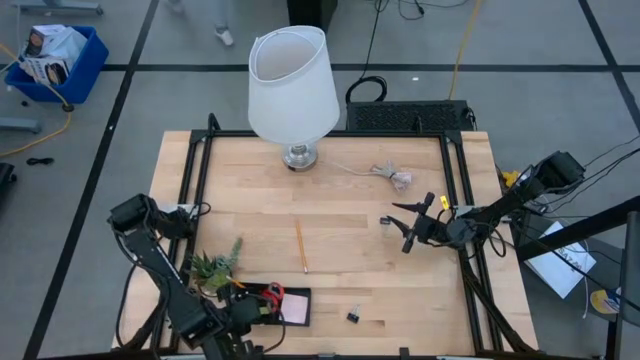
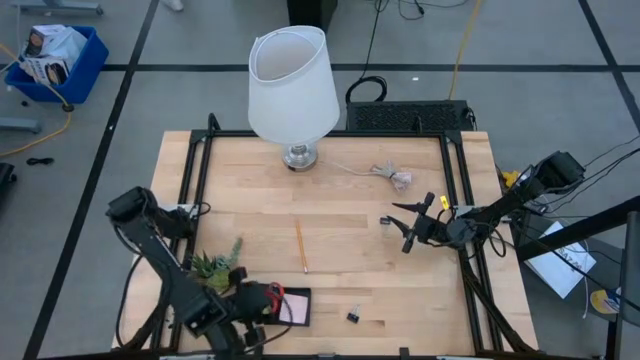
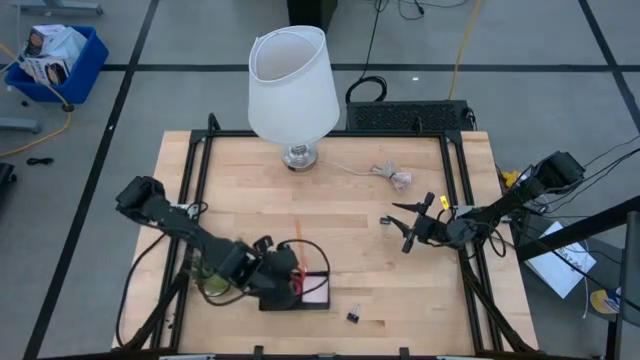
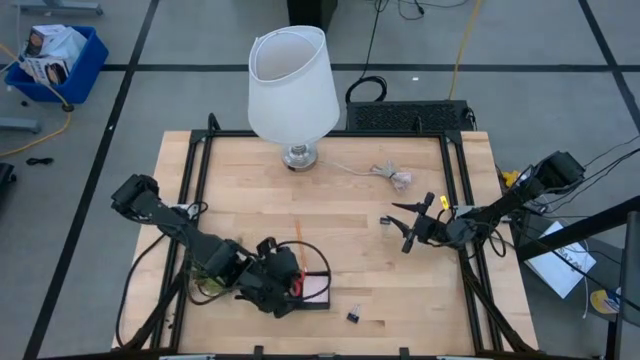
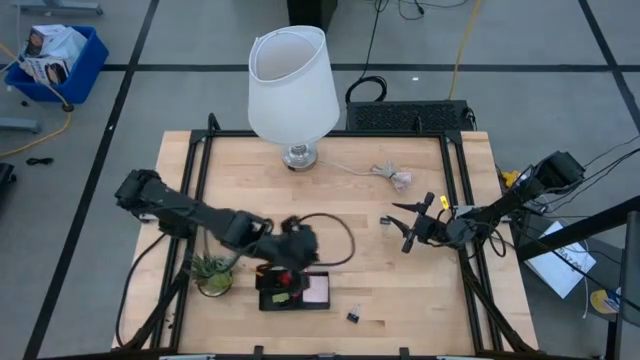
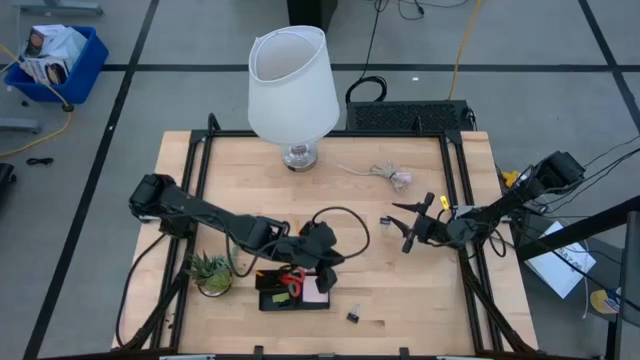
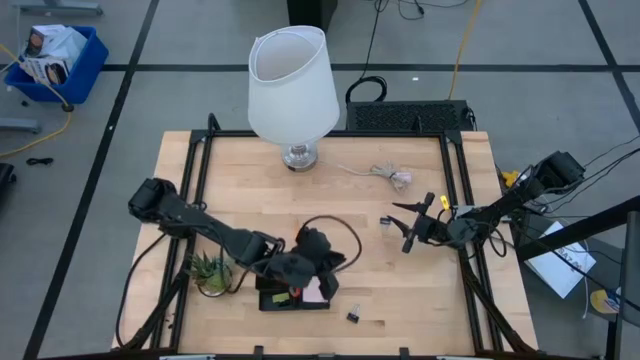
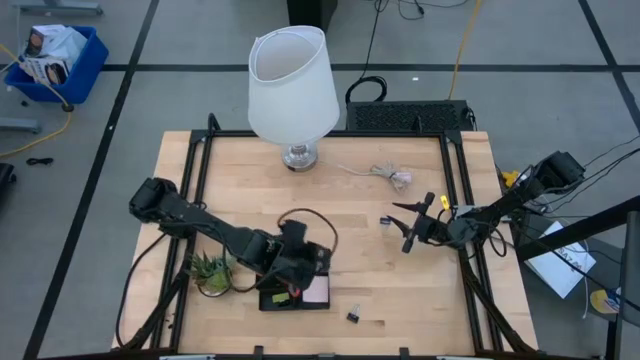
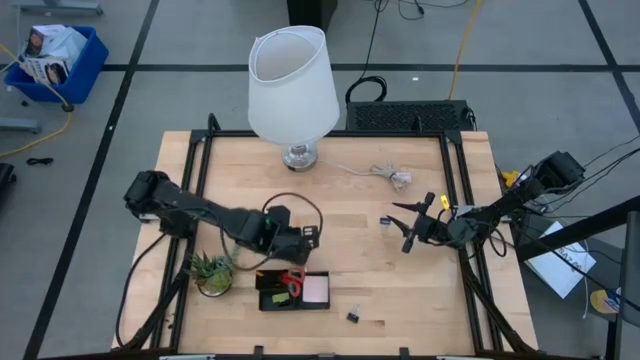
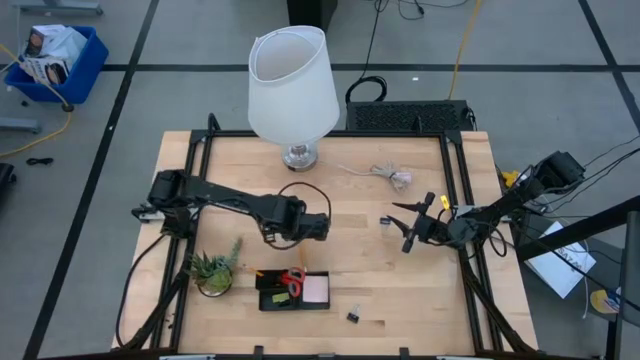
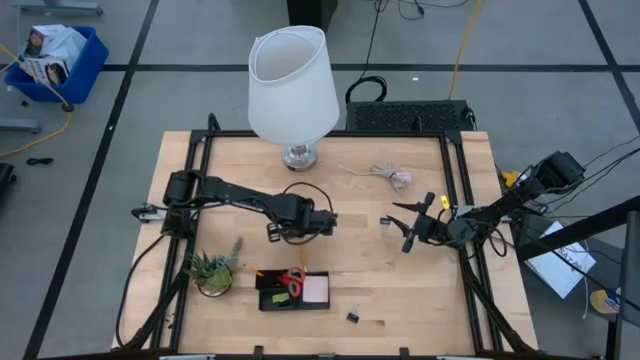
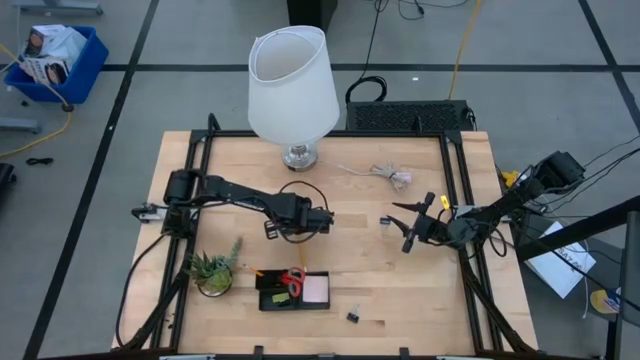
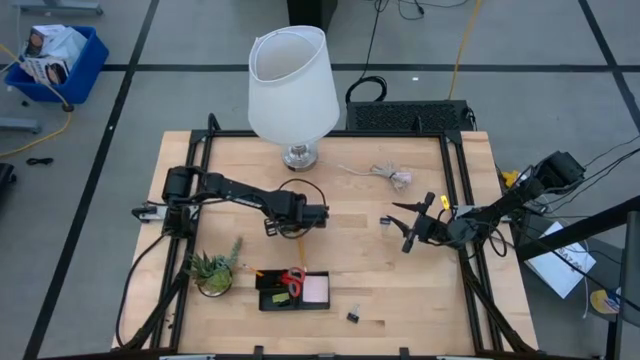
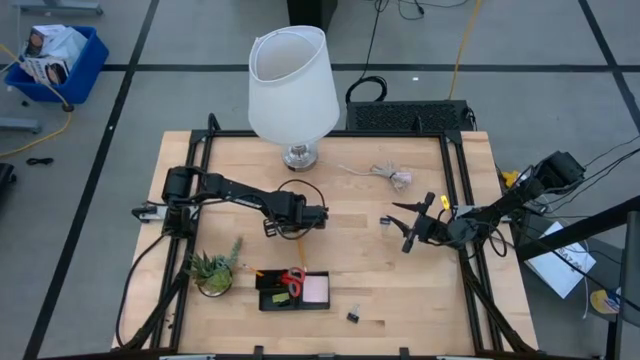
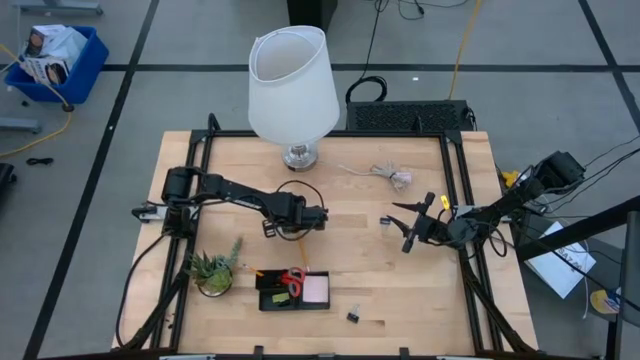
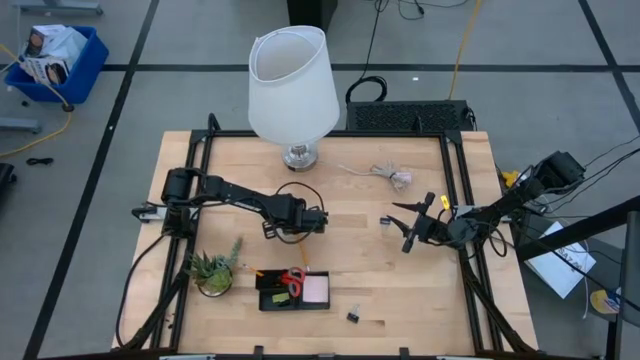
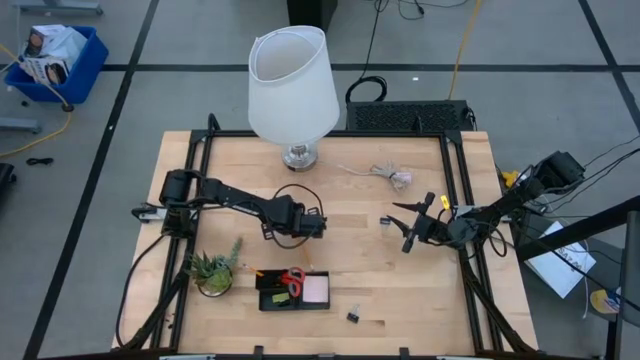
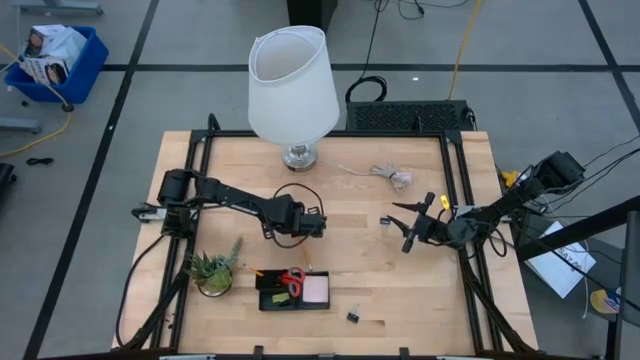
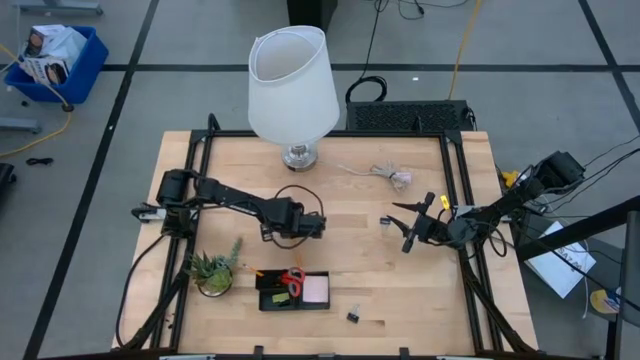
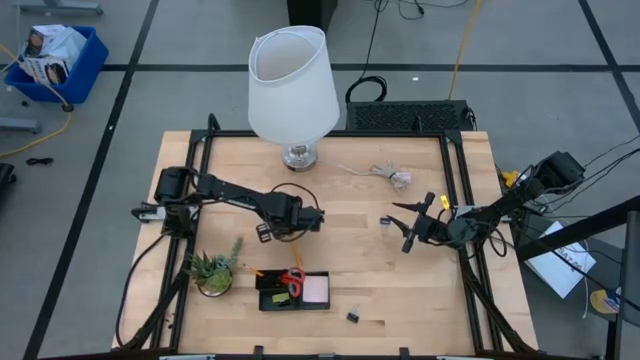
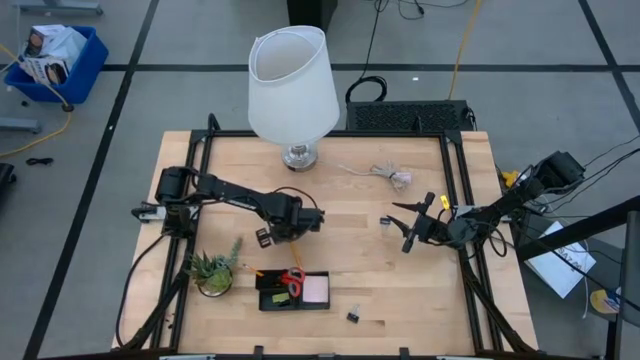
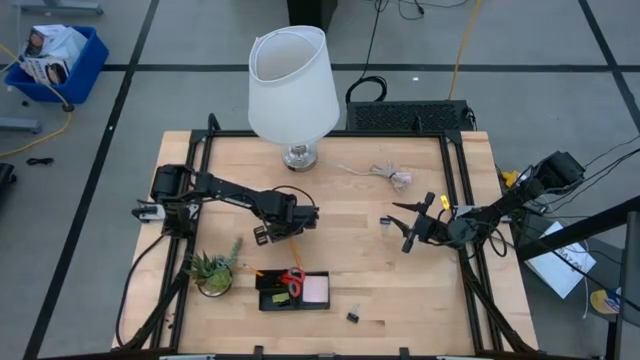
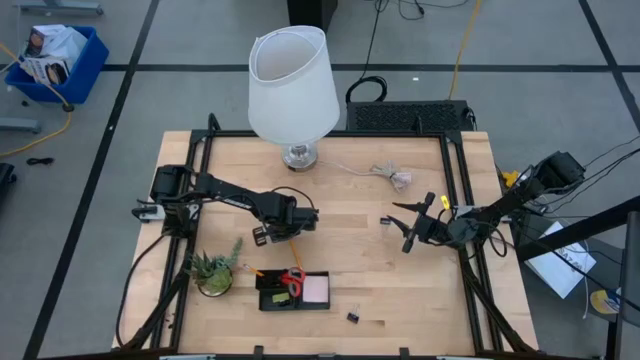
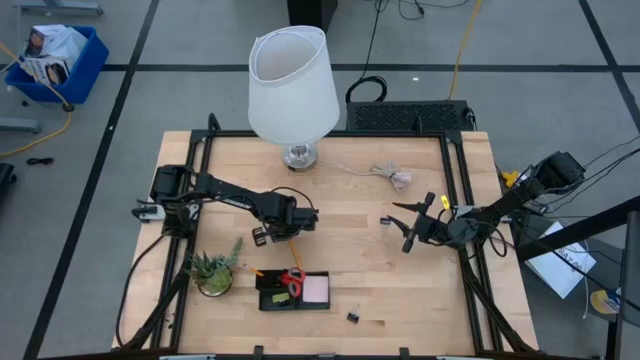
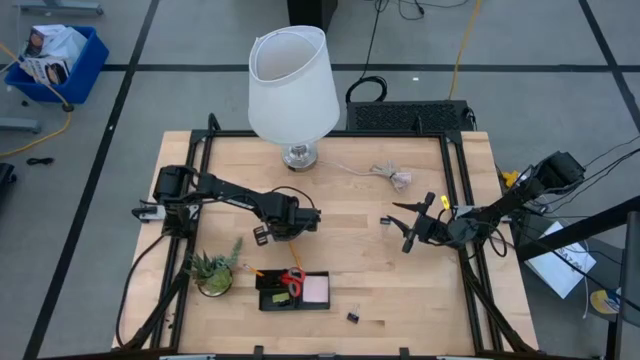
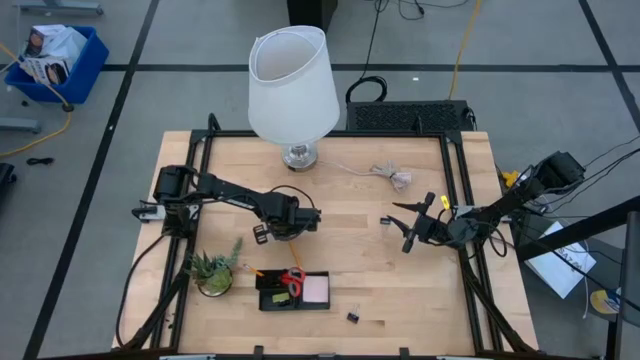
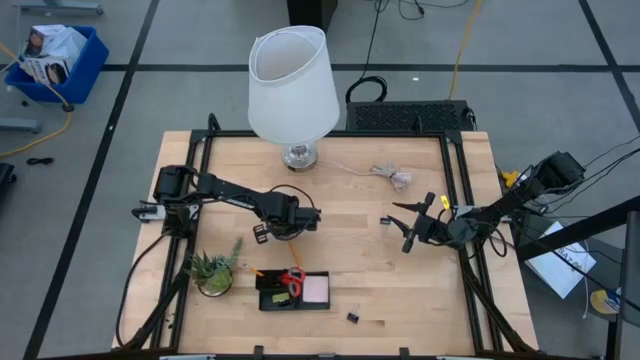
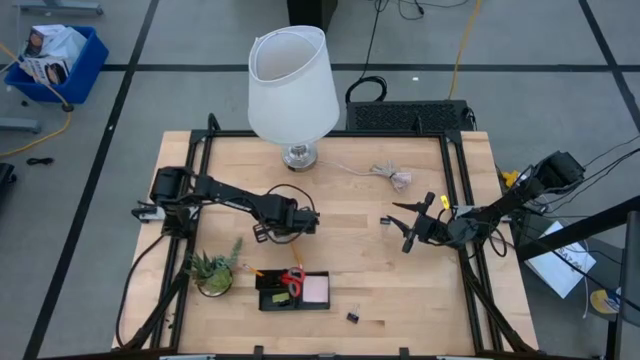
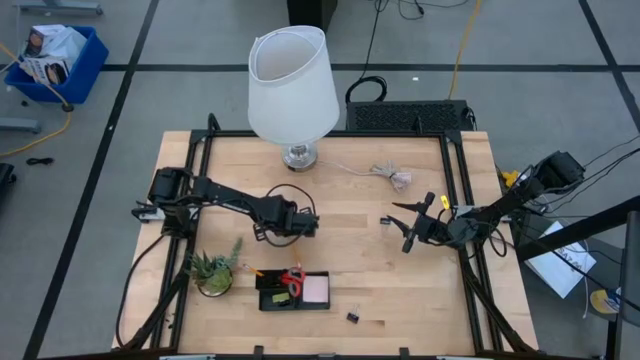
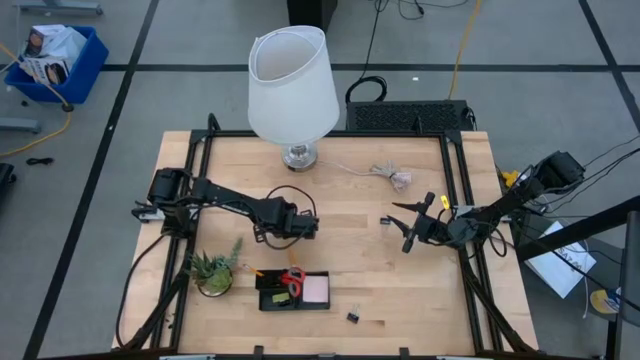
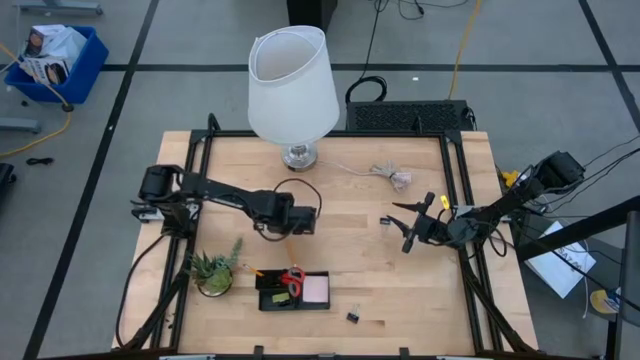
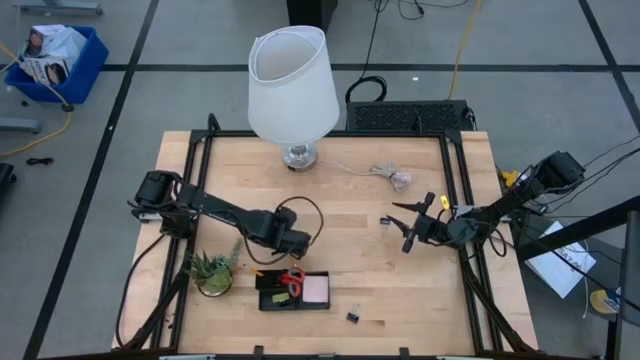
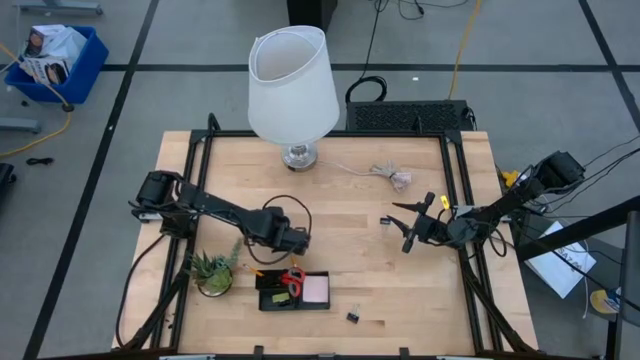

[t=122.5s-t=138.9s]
Task: Pick and place office supplies into organizer
Put the yellow pencil into the black desk organizer

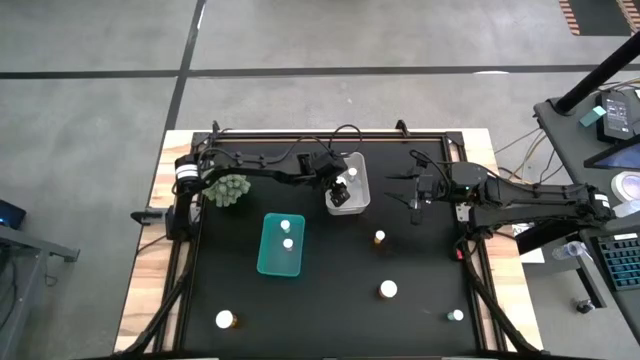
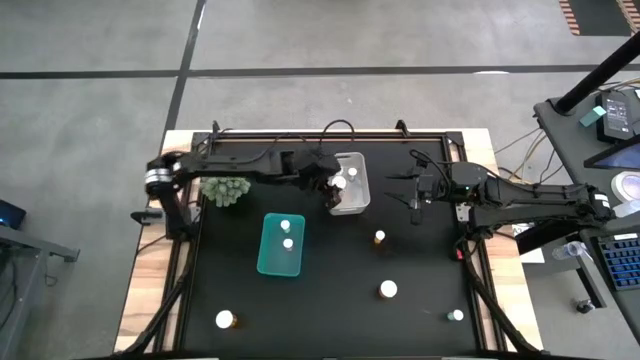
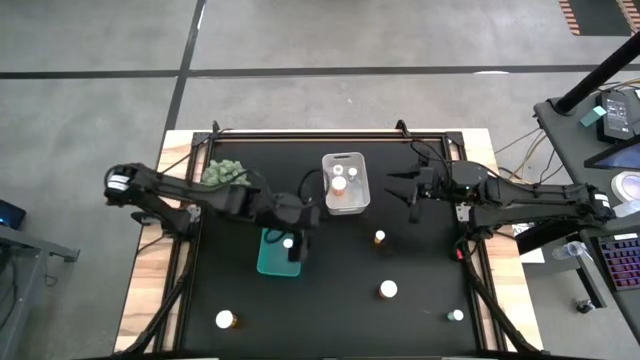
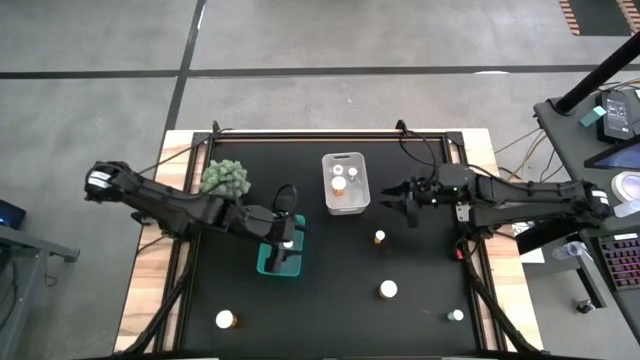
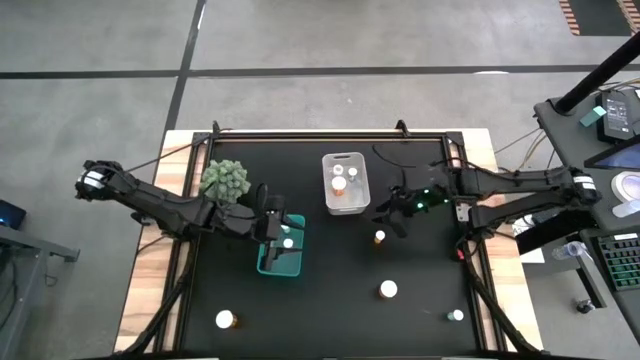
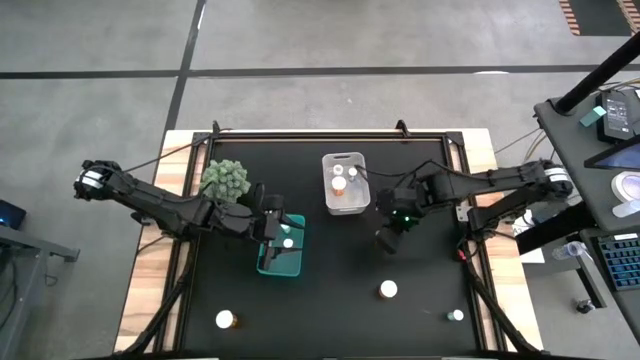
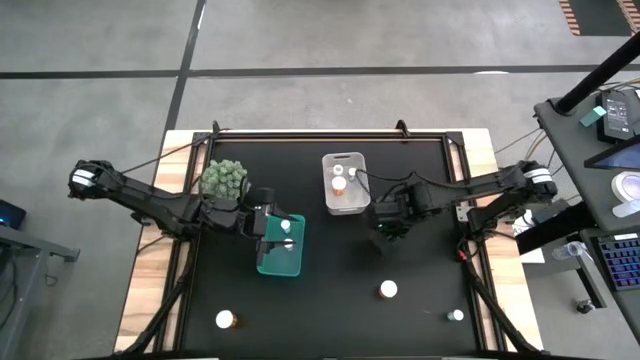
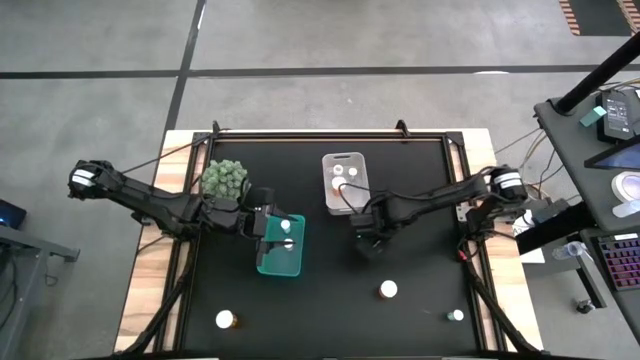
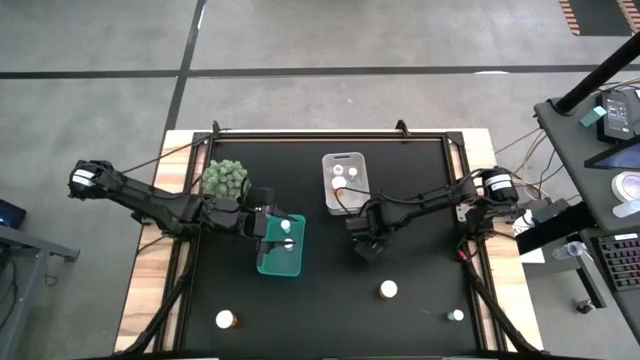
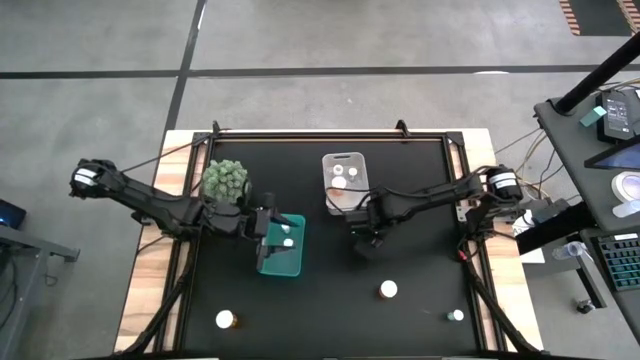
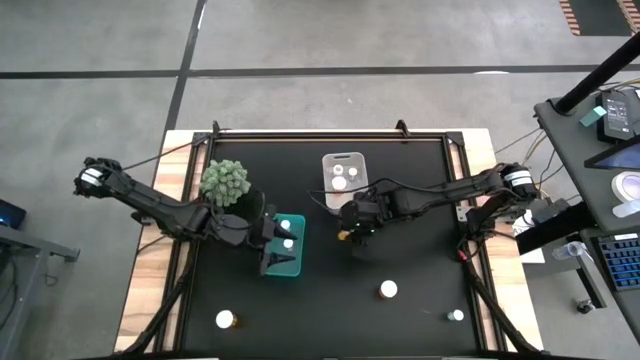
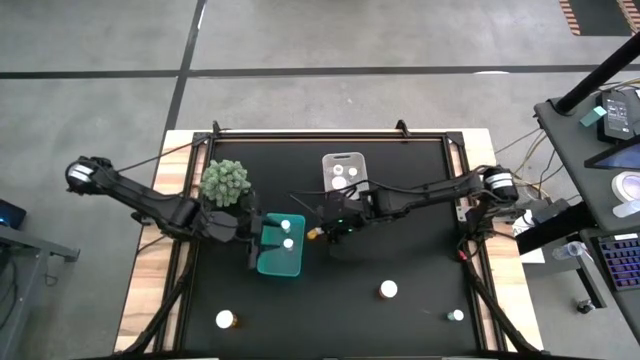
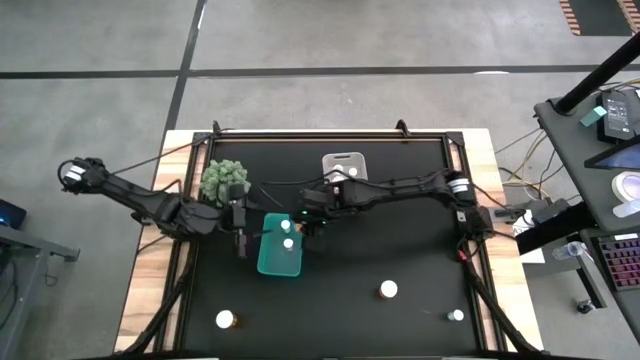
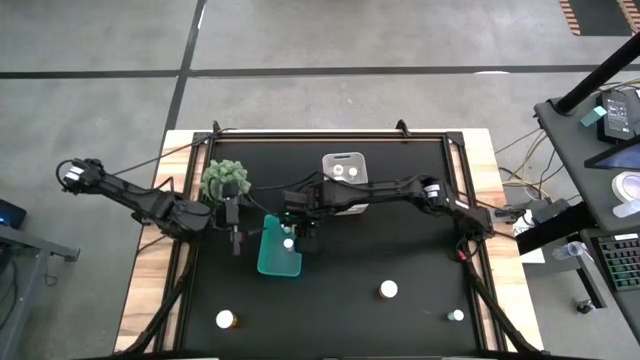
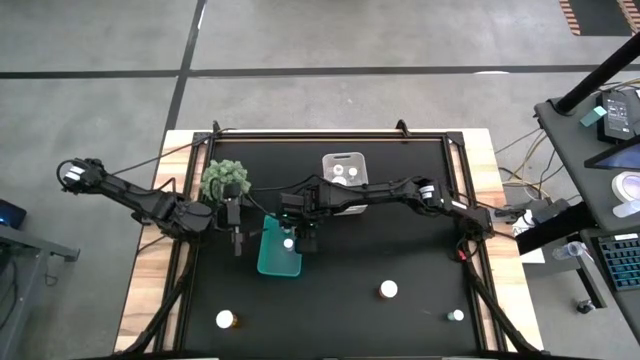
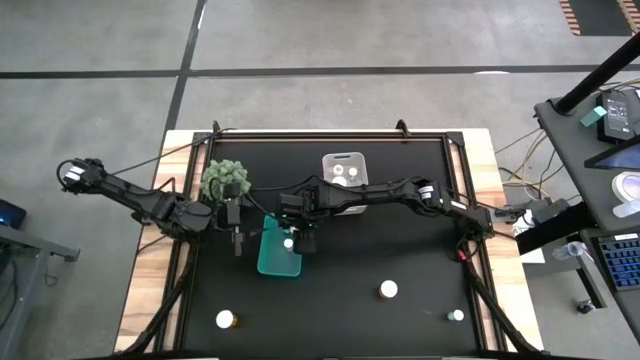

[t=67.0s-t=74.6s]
Task: Pick and place medicine bottles into bin by pill shape (circle, oval)
Put the top right orange pill bottle into the green bin
